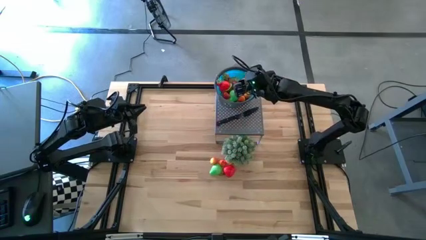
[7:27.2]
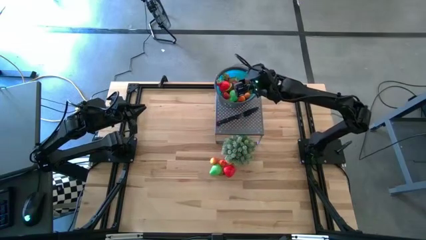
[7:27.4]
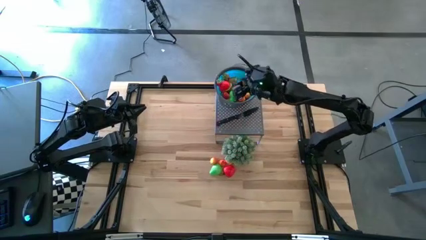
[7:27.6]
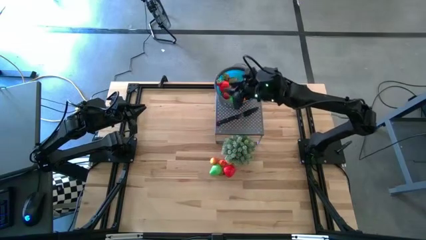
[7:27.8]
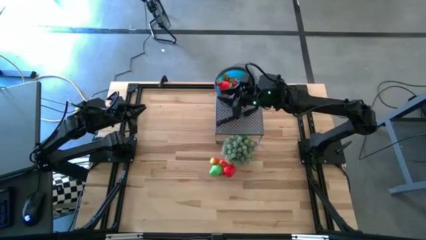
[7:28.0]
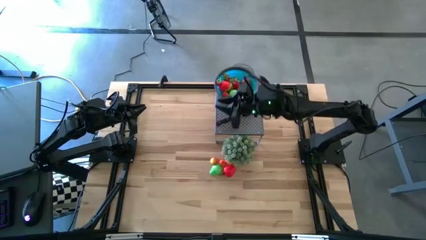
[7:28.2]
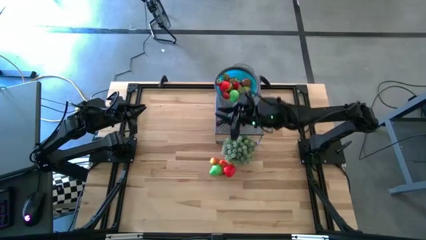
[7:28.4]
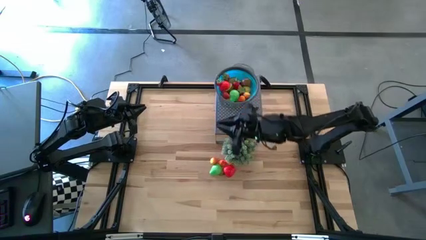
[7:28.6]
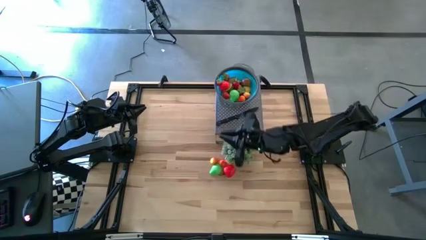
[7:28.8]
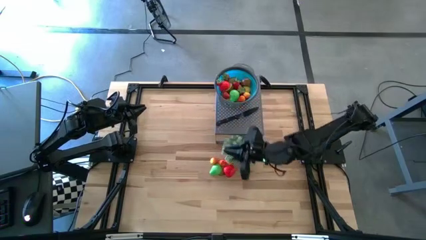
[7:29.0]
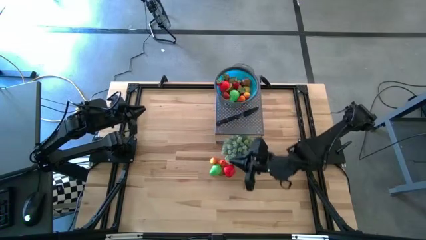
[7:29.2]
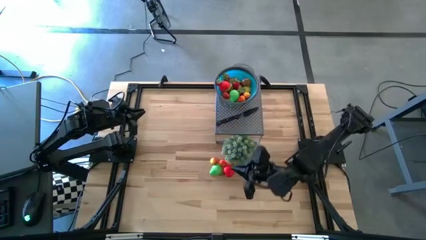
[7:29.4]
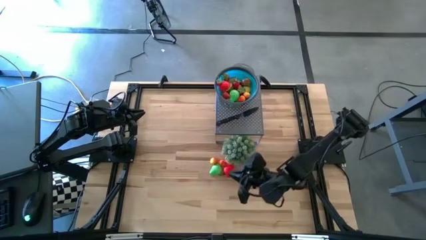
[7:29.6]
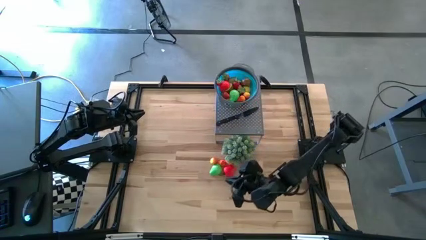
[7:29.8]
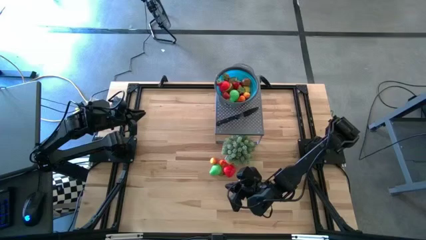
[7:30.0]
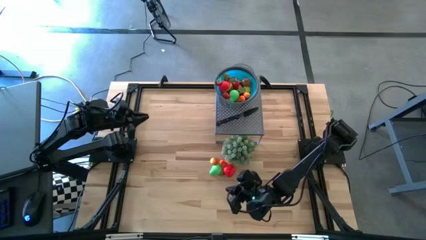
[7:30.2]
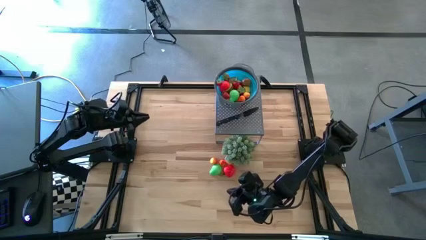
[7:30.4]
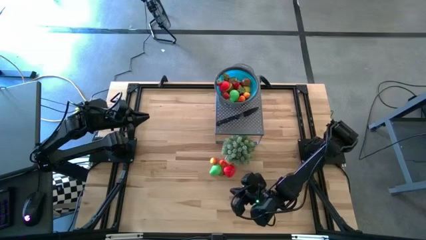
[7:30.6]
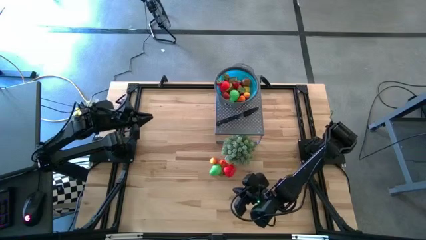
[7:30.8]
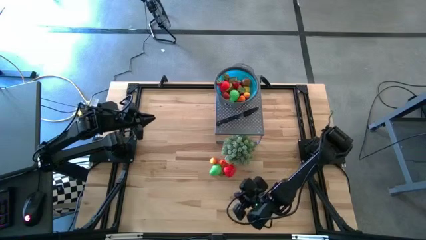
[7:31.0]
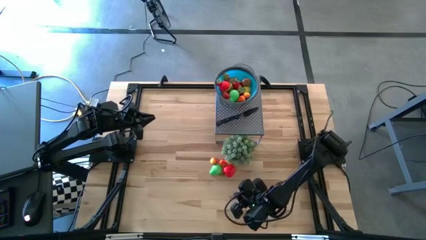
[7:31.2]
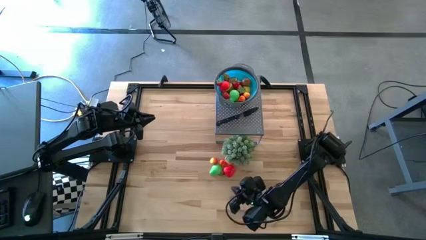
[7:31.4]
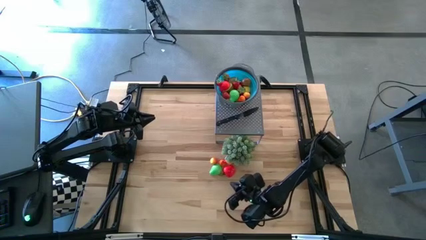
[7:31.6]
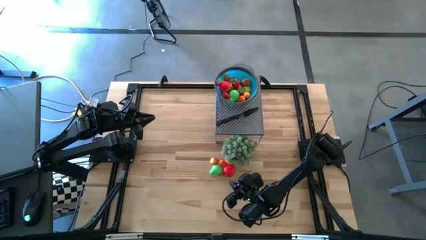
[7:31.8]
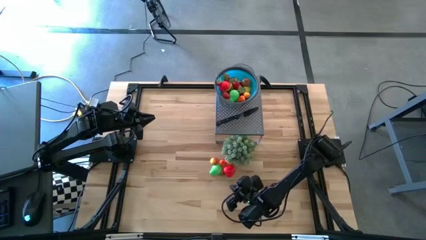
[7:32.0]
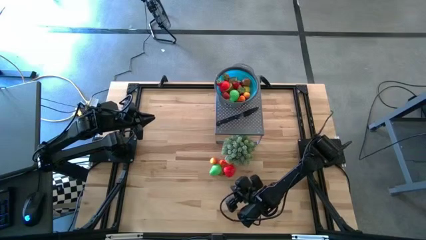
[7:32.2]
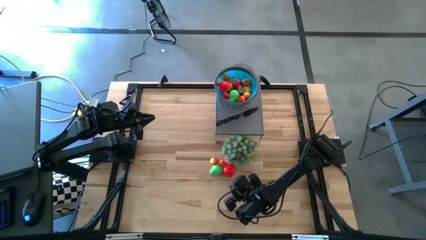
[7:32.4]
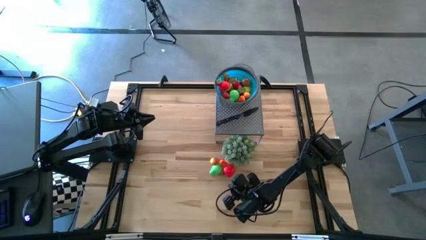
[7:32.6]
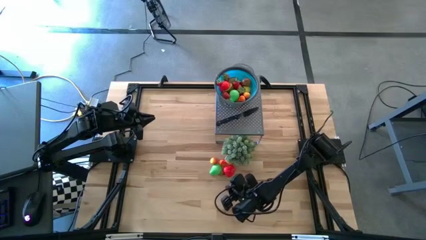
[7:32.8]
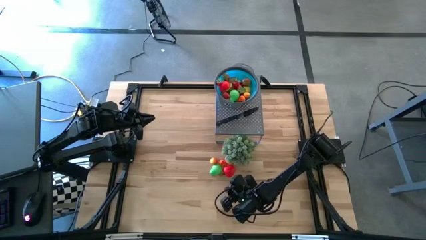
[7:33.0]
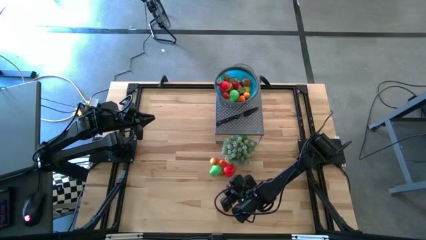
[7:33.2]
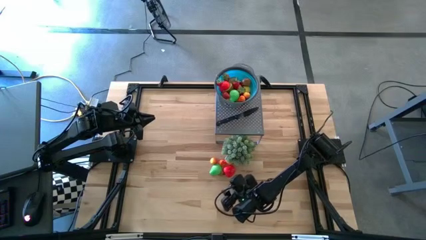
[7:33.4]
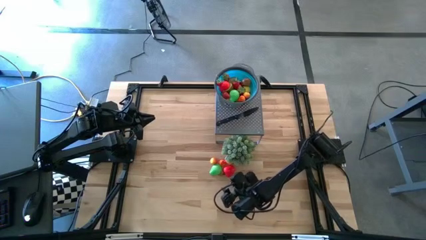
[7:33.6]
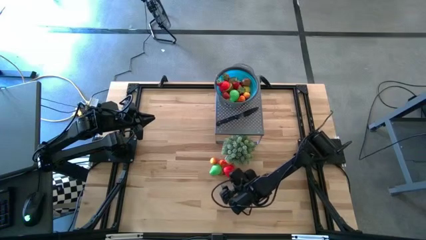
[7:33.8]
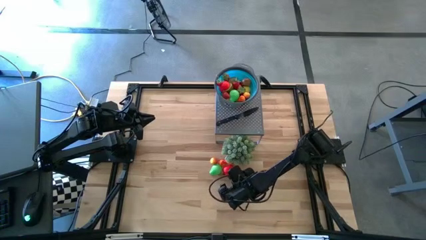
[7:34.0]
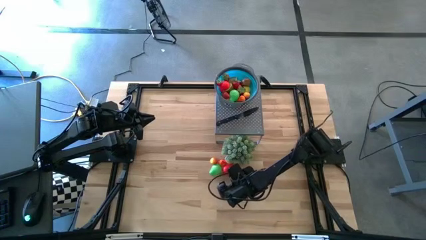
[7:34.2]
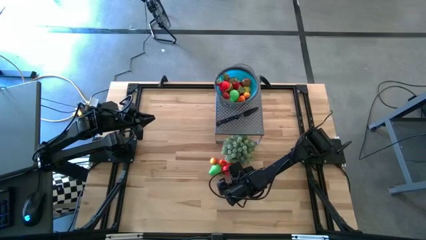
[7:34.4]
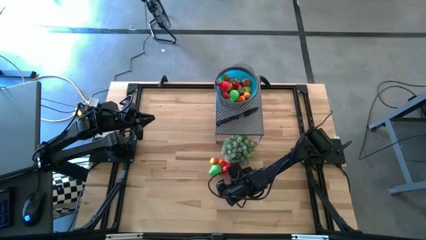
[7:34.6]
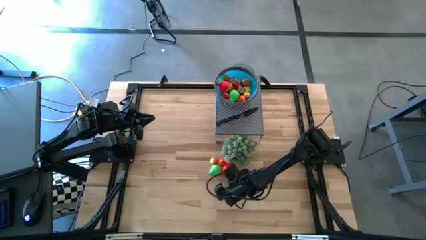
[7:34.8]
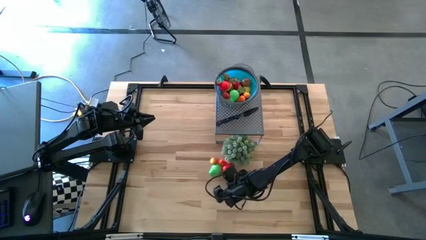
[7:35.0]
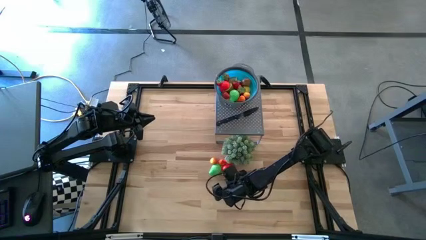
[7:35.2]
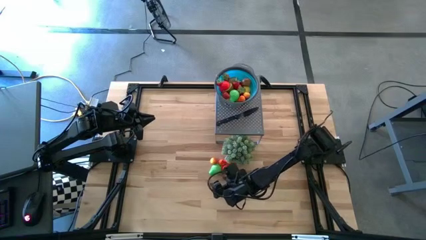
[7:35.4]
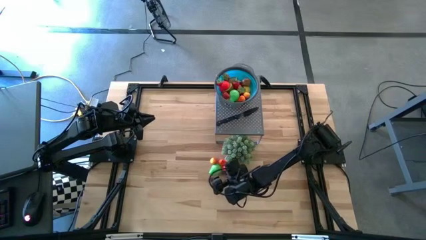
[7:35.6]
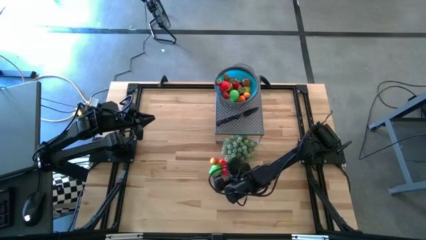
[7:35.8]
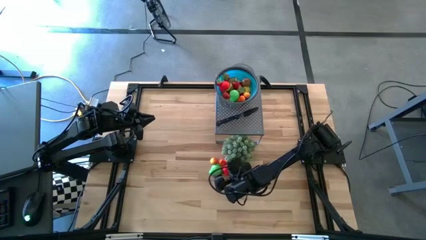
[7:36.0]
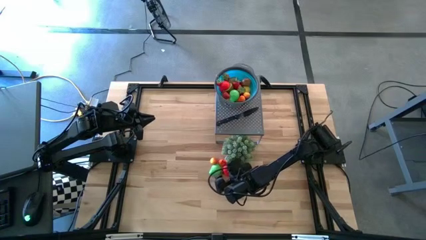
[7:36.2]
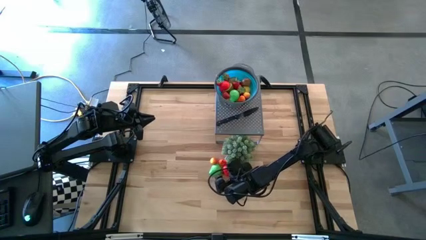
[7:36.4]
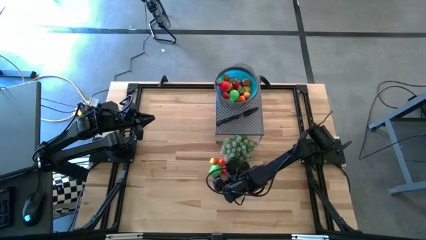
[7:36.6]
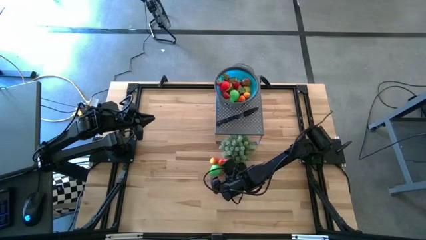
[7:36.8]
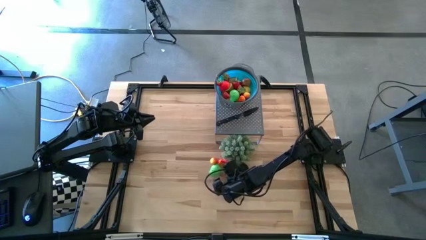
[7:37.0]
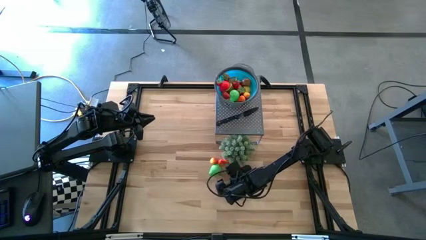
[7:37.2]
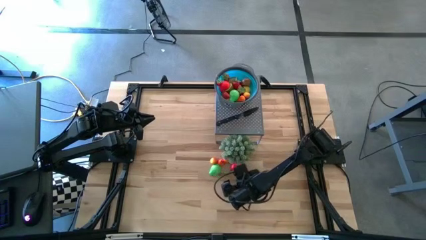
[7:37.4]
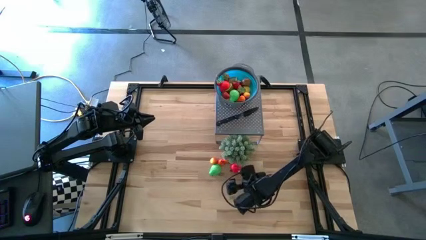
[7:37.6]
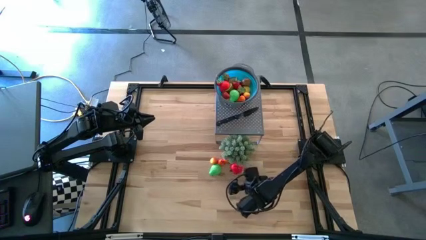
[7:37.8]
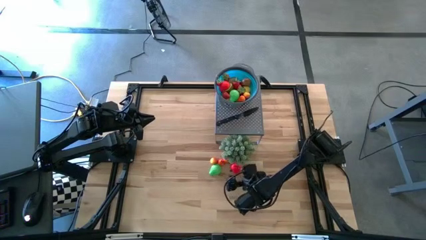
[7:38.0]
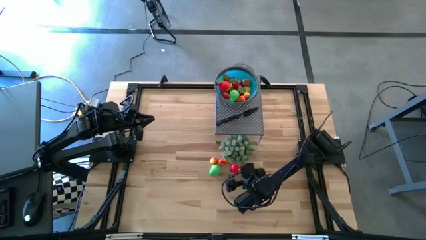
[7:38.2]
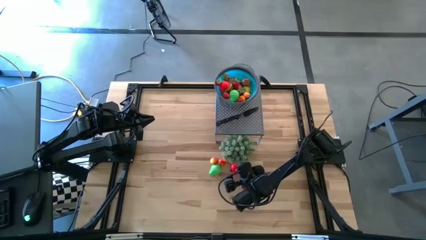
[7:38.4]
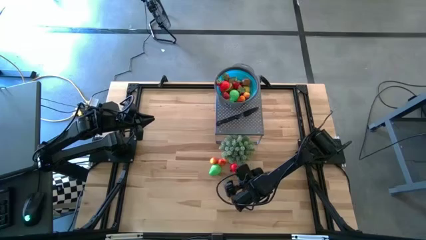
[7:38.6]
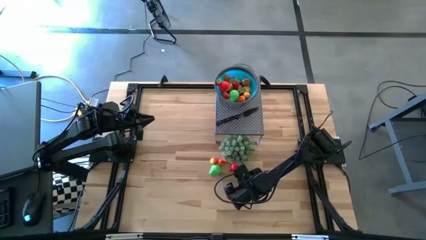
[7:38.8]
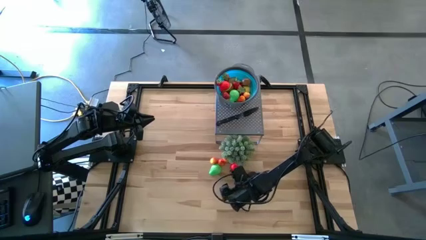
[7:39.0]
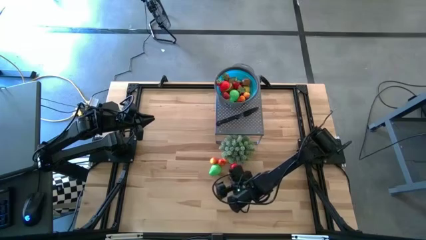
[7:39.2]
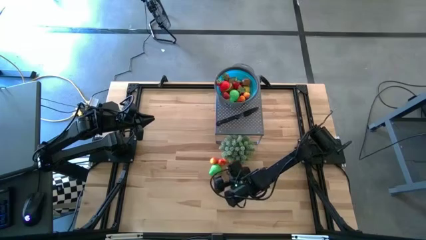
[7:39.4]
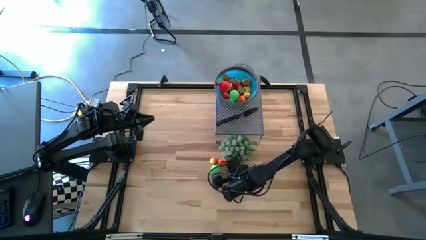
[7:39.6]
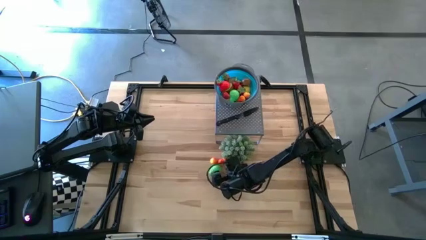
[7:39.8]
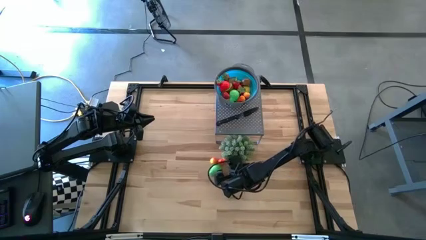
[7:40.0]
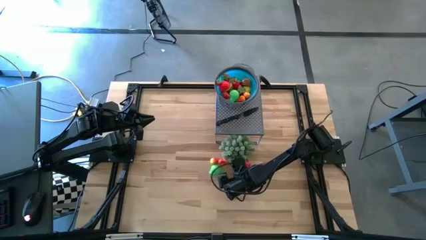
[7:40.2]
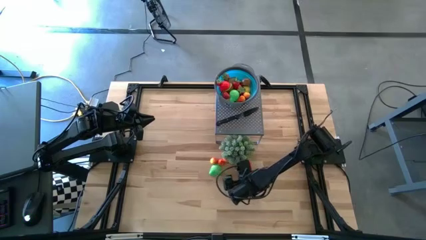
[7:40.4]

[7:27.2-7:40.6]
Task: Pick & Place Fruit
Put the red apple into the blue strainer bowl

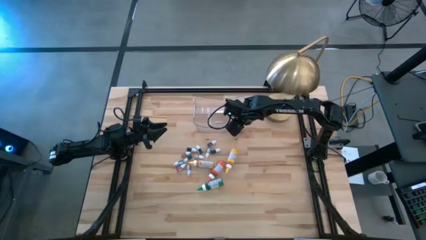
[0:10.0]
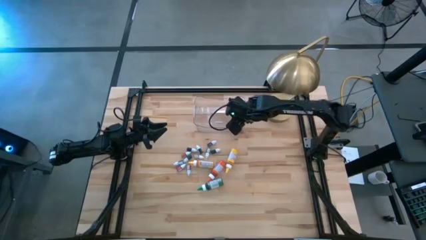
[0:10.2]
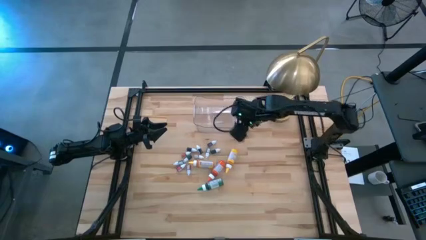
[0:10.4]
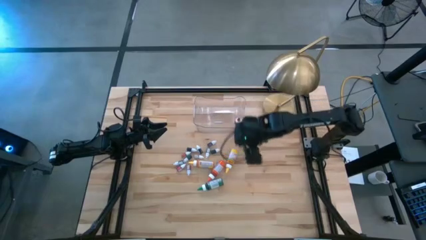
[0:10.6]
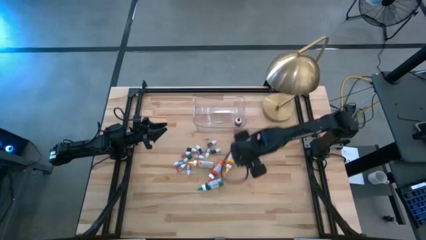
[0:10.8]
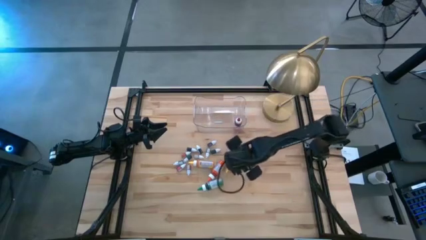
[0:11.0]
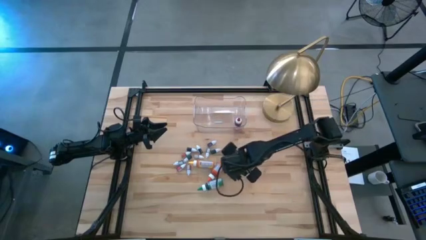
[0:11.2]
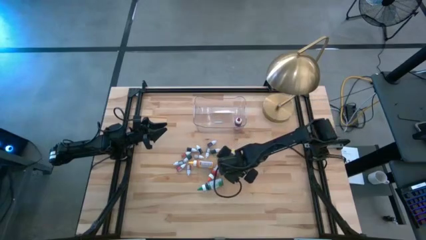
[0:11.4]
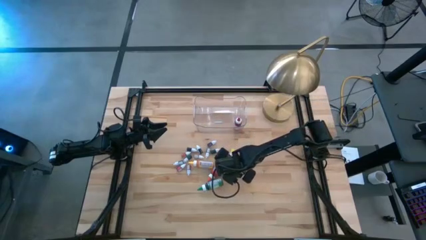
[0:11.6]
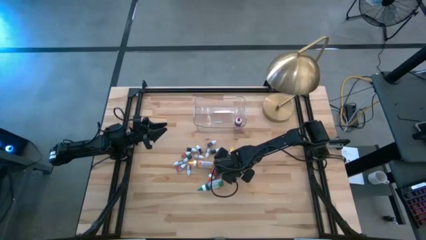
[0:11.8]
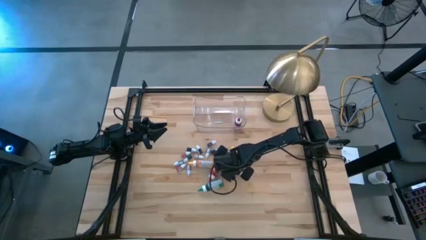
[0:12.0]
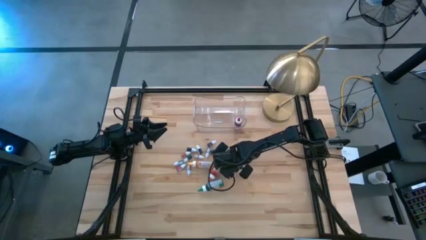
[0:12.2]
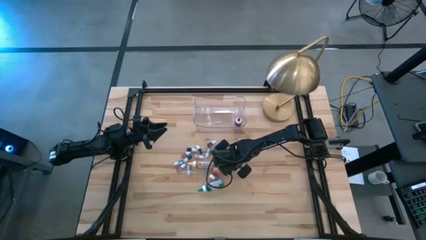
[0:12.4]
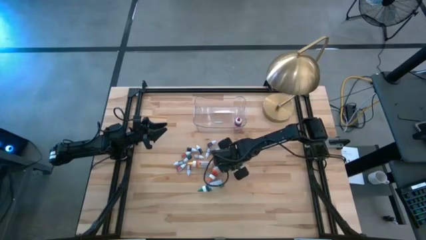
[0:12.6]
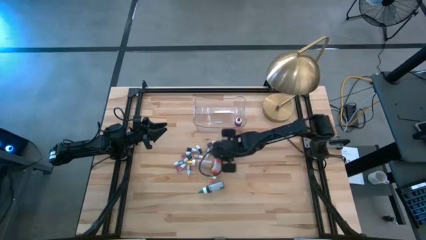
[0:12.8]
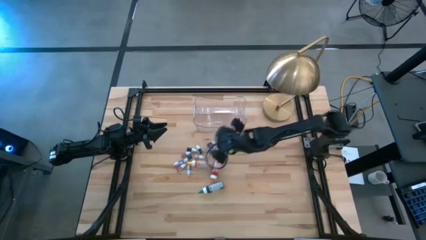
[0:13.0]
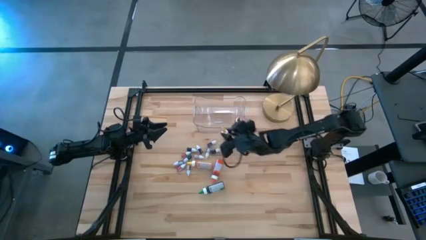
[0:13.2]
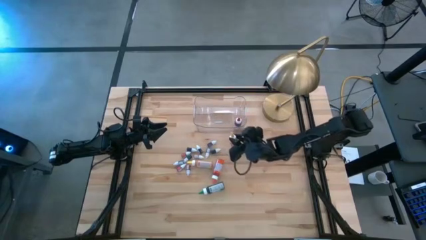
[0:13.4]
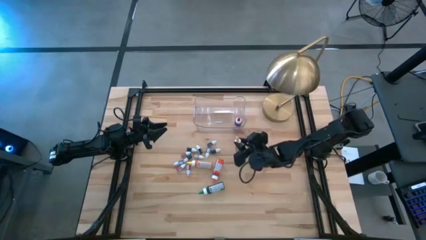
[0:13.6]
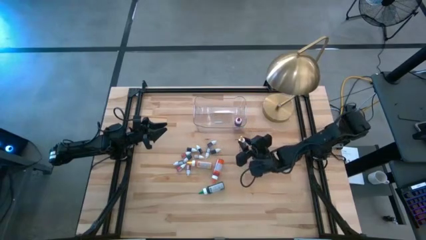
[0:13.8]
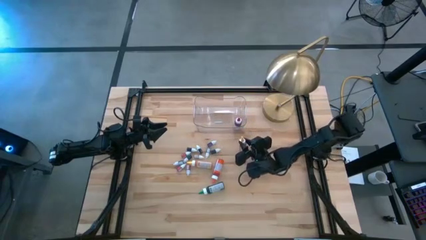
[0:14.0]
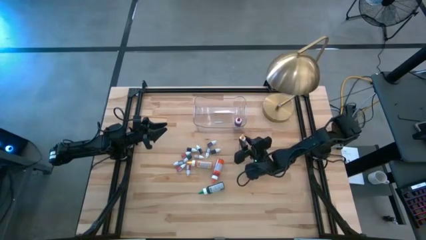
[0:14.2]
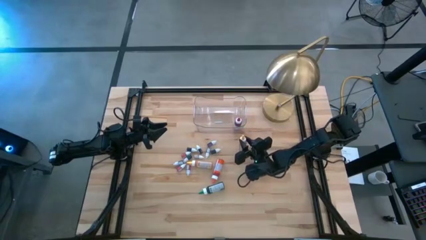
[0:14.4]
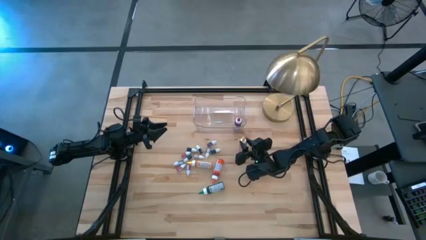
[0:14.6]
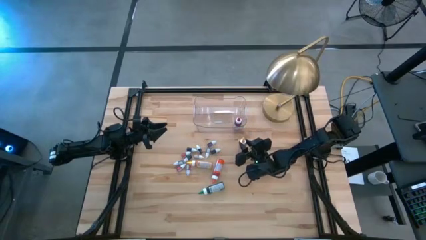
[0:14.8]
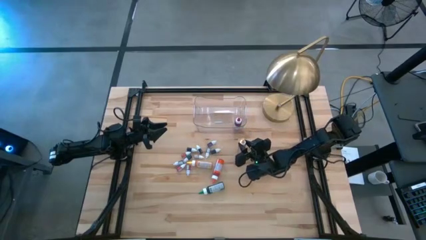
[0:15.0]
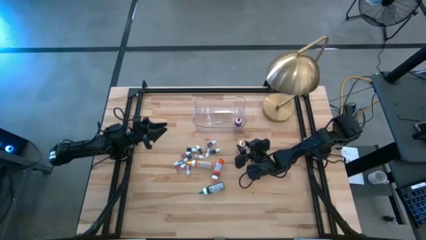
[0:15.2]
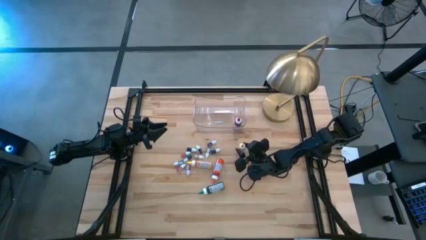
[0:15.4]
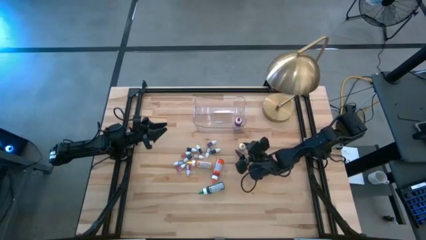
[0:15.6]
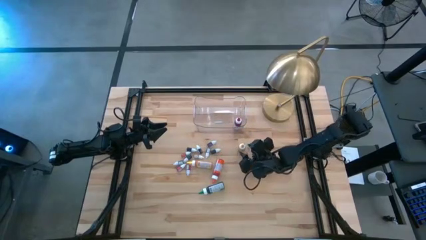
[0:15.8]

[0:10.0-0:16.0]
Task: Pick & Place food coloring
Move the right big yellow food coloring bottle to the center of the table
